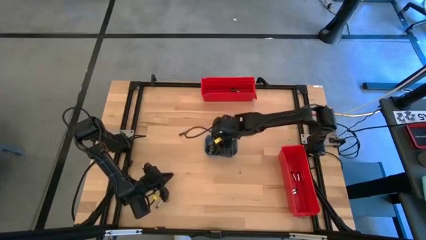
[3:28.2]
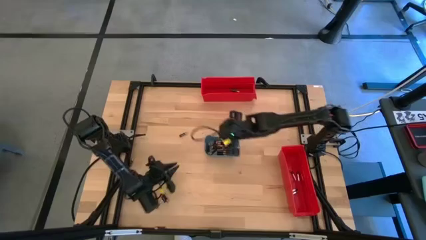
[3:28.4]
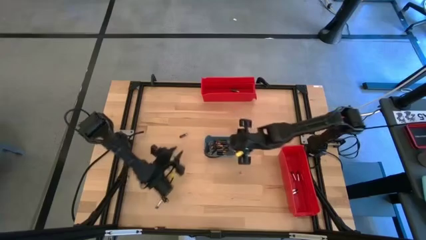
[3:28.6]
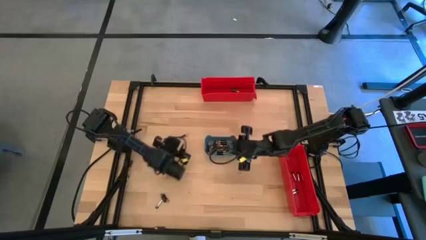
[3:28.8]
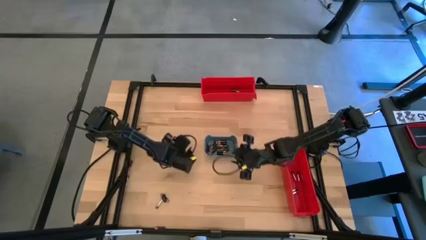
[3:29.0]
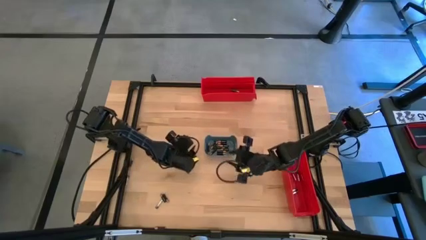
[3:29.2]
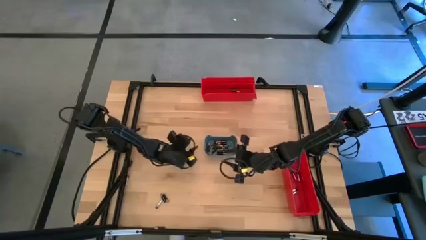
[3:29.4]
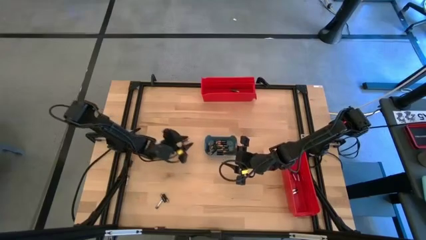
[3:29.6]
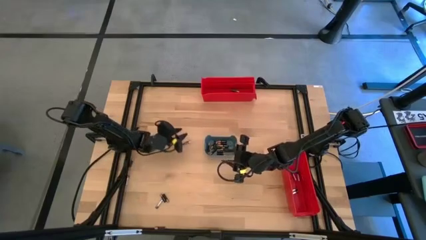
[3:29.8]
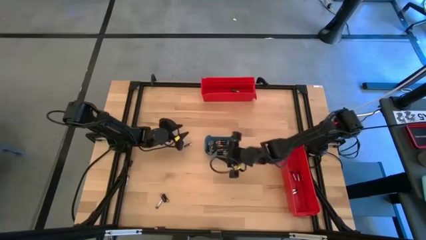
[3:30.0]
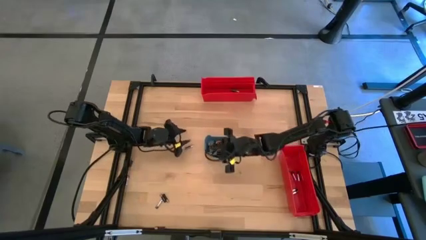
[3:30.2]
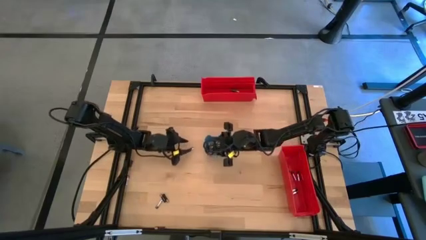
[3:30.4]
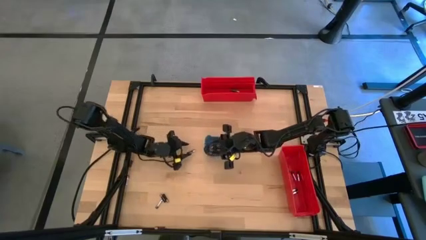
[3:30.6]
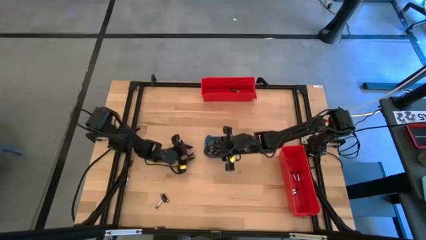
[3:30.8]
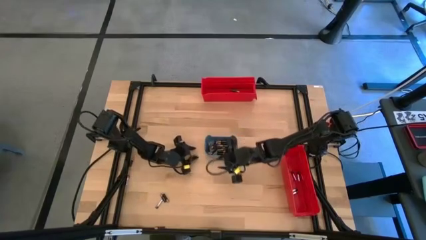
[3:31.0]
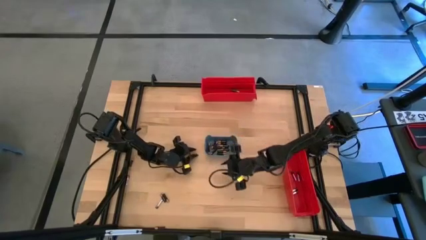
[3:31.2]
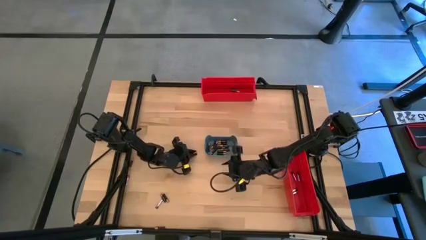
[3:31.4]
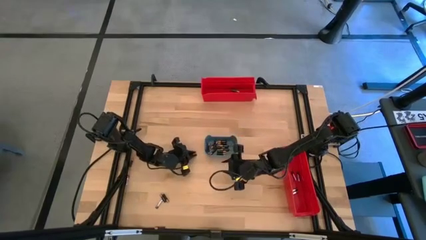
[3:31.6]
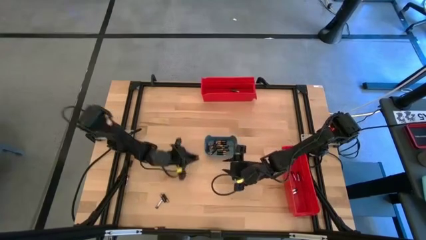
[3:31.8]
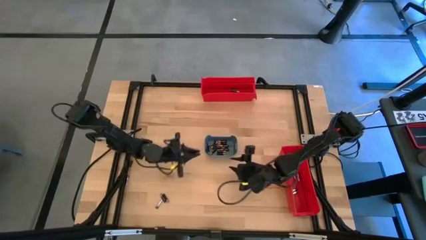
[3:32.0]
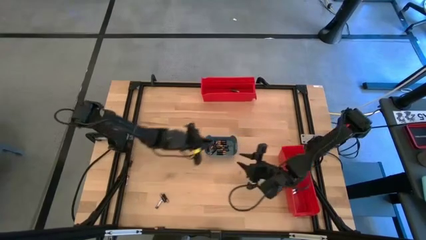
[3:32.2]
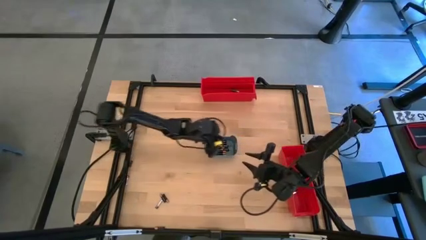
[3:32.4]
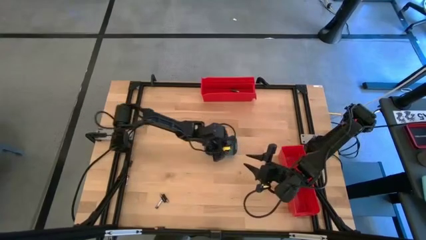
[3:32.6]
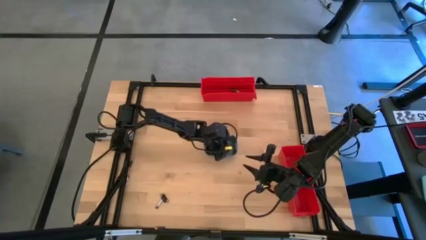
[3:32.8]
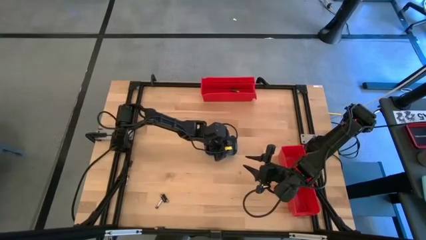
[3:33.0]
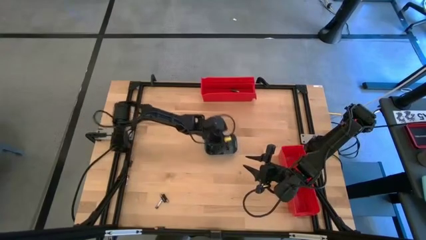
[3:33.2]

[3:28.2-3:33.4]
Task: Sort batteries
Put the black battery into the blue bin

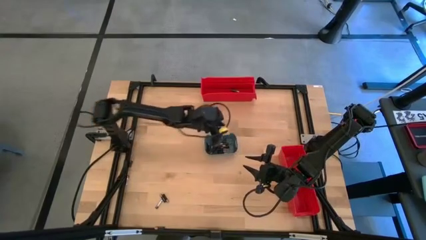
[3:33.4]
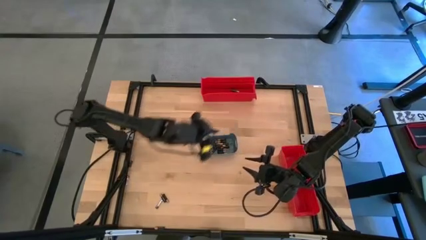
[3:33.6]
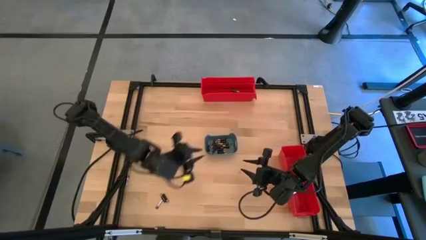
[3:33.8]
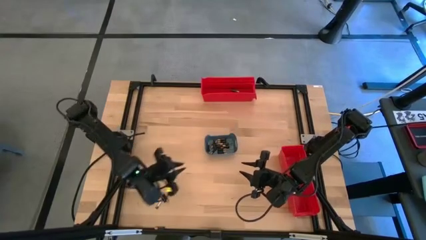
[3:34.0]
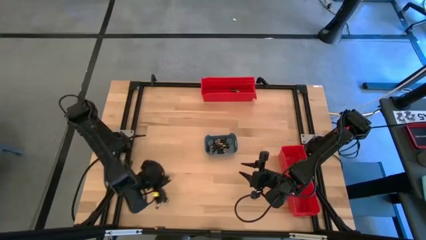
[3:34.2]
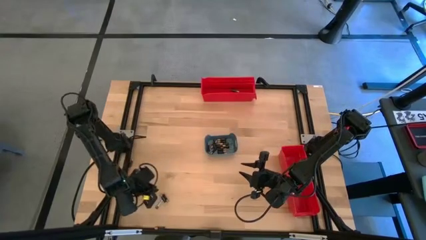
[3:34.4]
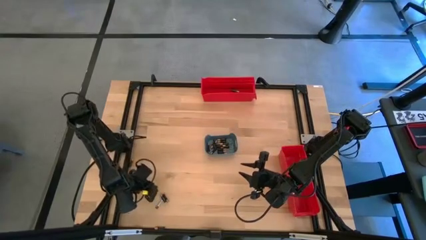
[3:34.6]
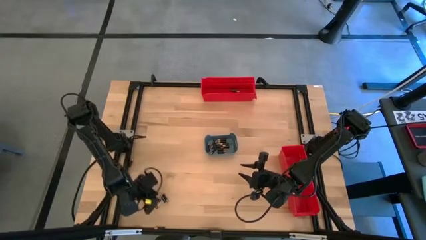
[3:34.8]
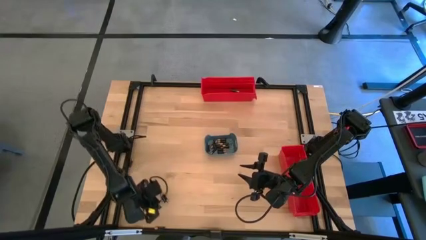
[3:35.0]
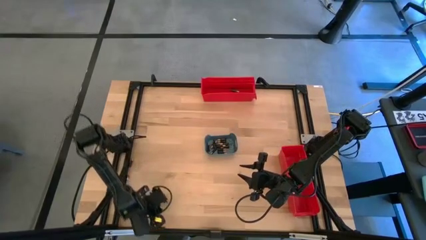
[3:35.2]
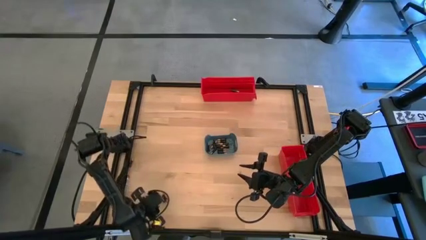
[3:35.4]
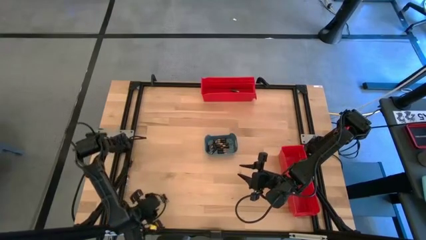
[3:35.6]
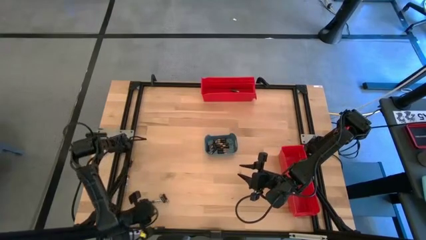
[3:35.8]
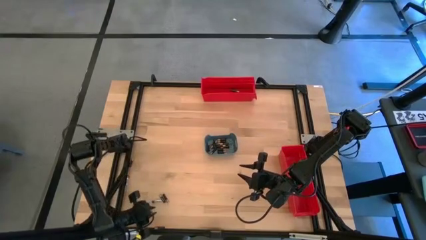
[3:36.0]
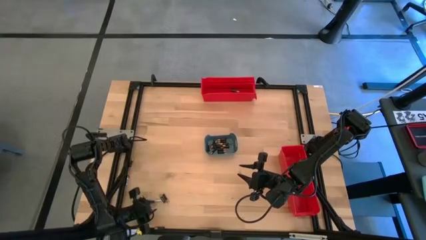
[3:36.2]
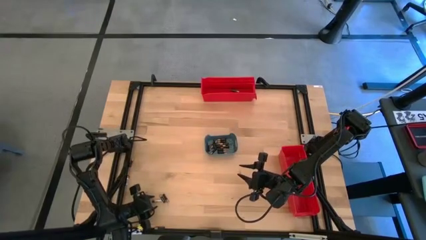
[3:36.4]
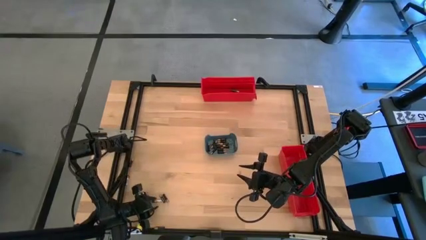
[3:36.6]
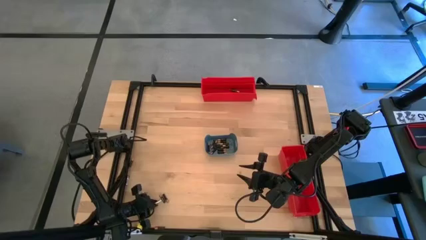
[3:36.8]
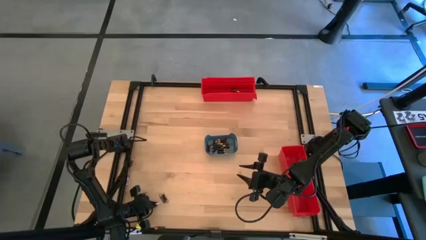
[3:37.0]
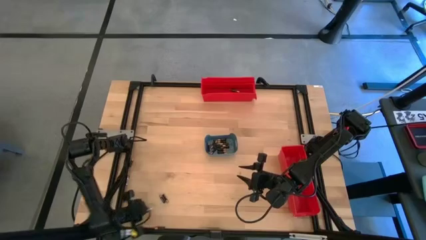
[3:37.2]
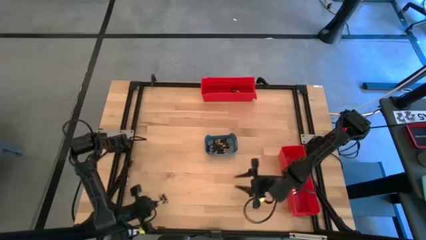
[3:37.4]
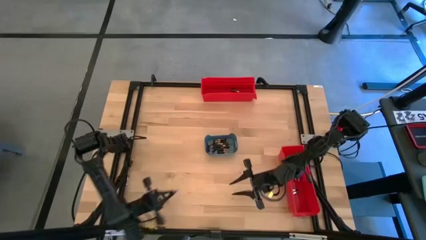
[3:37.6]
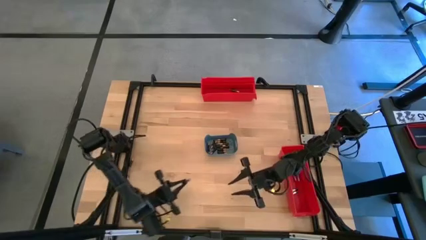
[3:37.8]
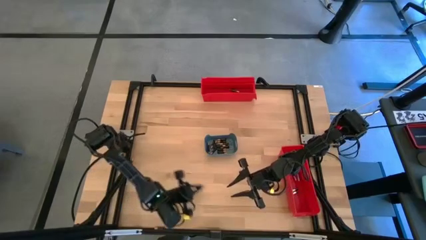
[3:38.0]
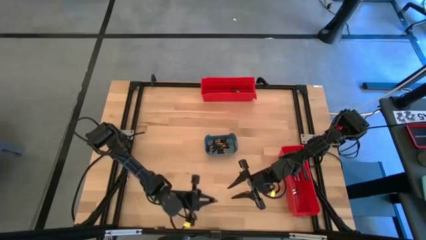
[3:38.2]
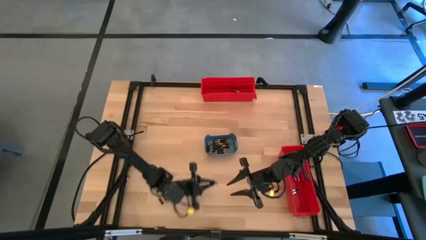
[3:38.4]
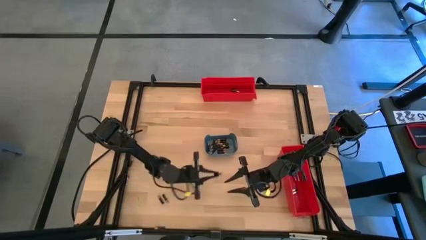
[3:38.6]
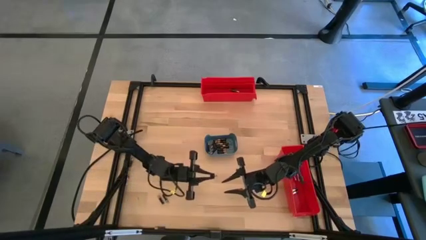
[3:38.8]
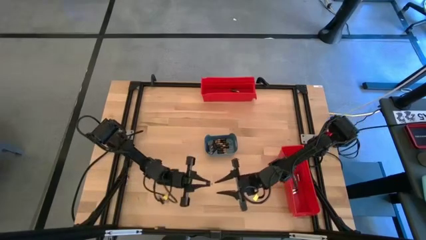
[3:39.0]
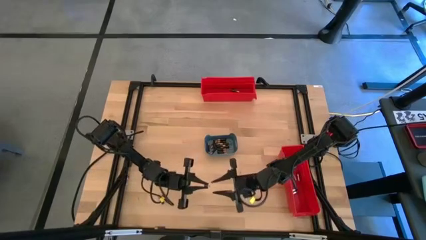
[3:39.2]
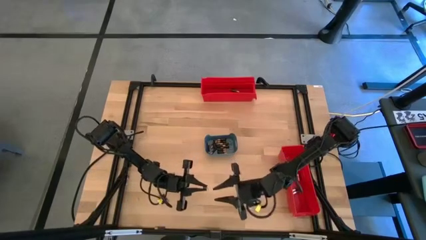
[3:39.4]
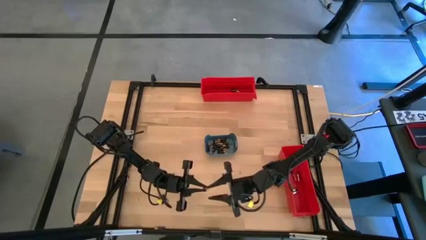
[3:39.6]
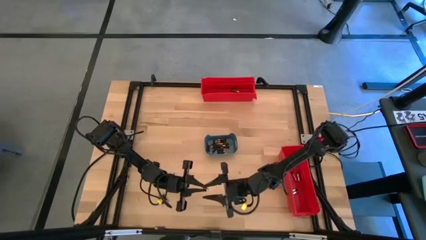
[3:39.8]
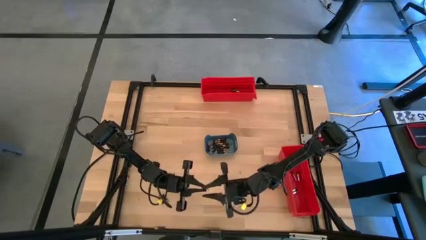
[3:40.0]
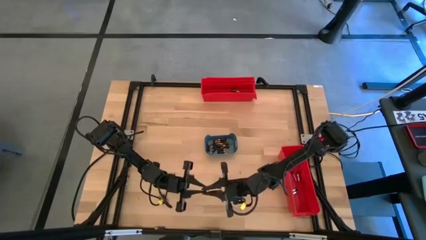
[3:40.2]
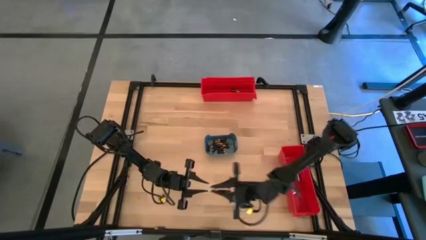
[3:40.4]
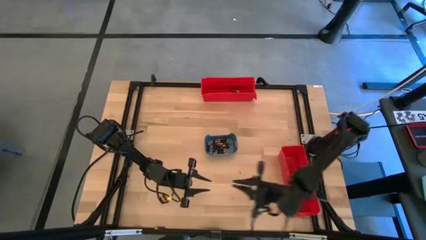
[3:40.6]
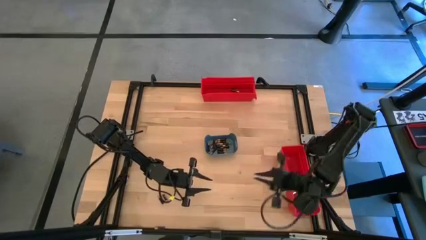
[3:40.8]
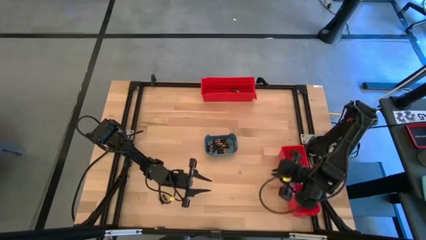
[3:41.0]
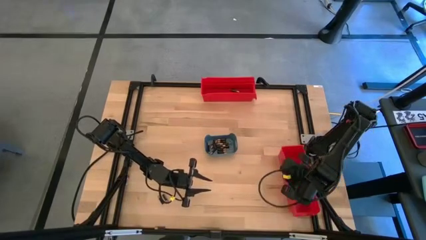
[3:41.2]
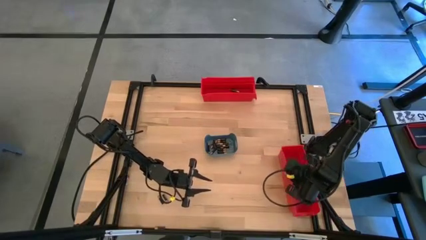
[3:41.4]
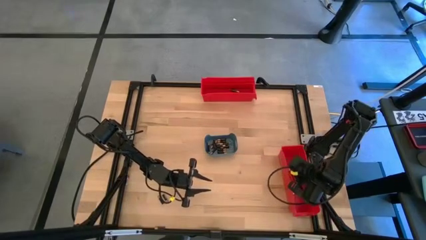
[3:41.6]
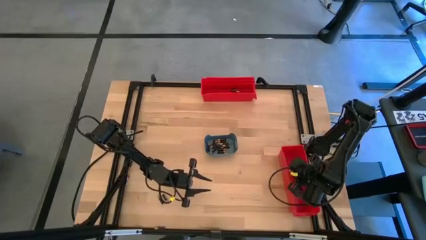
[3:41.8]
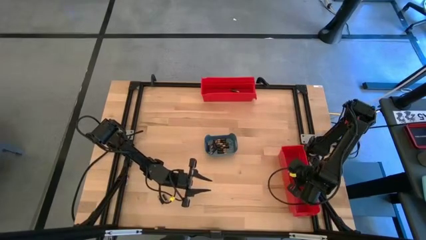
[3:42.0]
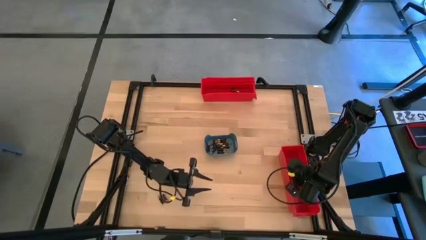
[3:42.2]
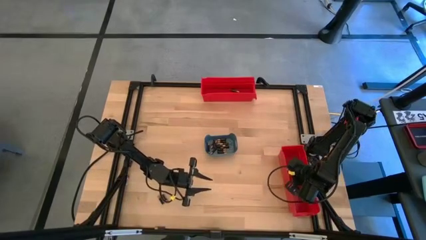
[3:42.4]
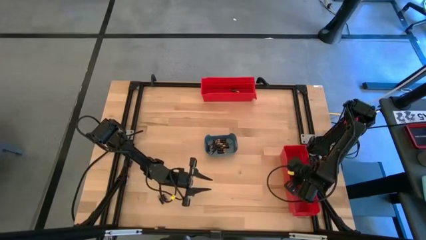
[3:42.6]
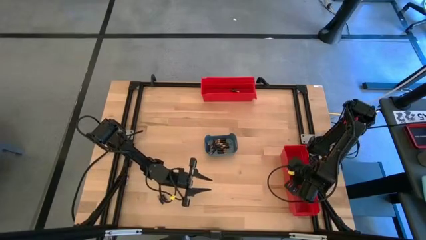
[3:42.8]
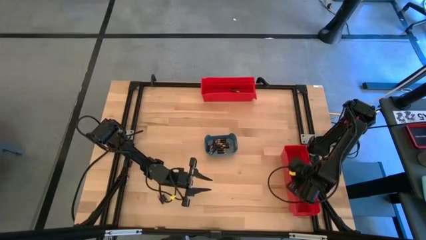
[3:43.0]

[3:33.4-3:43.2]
Put the silver battery into the bottom red bin
